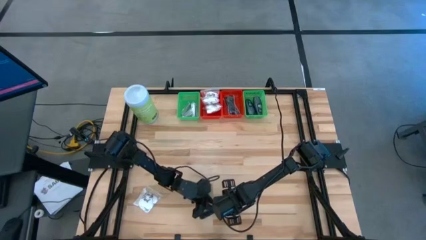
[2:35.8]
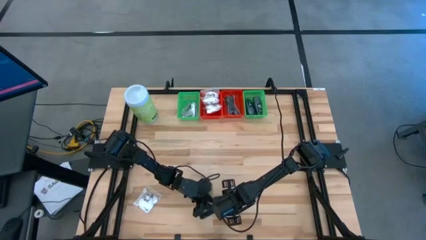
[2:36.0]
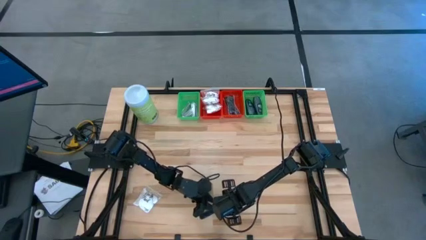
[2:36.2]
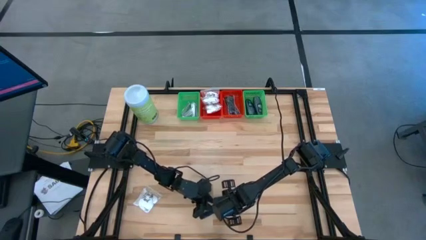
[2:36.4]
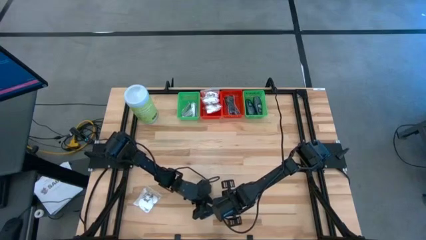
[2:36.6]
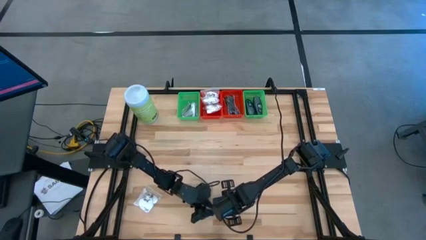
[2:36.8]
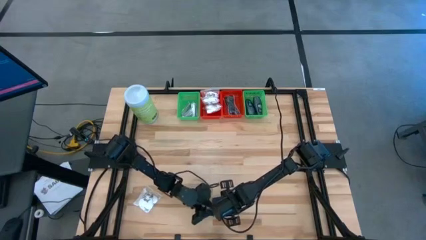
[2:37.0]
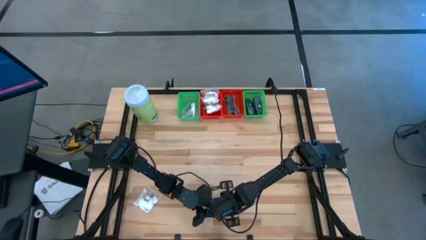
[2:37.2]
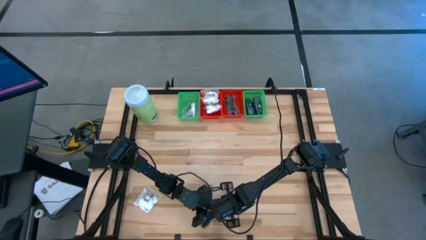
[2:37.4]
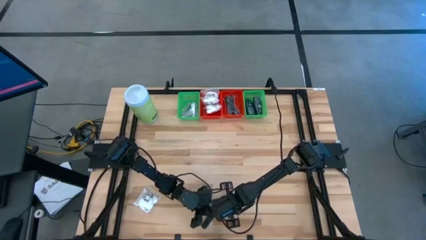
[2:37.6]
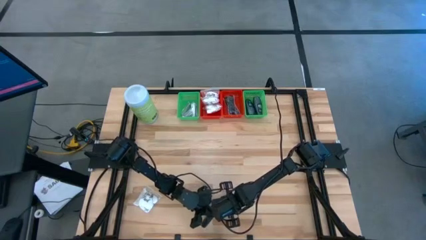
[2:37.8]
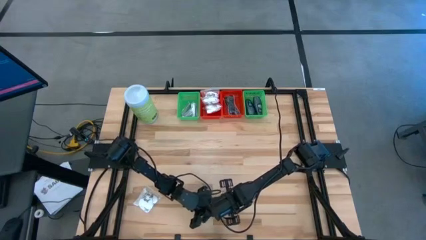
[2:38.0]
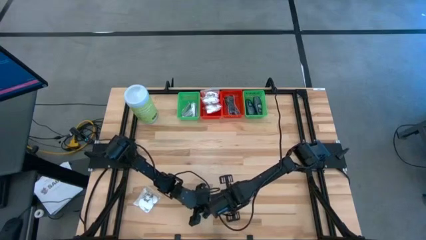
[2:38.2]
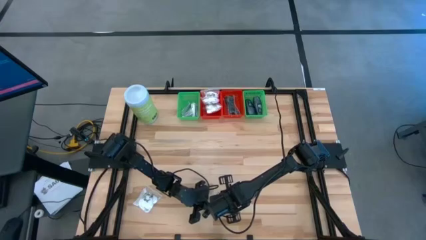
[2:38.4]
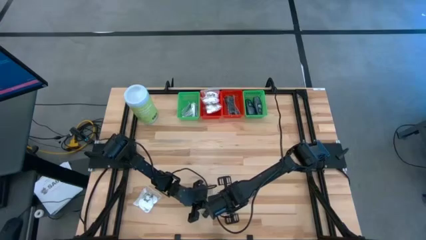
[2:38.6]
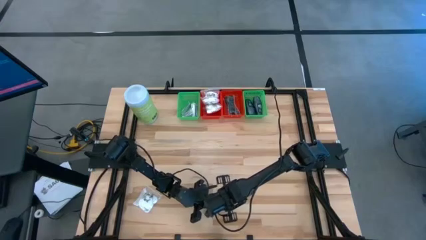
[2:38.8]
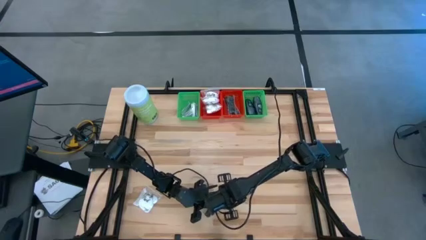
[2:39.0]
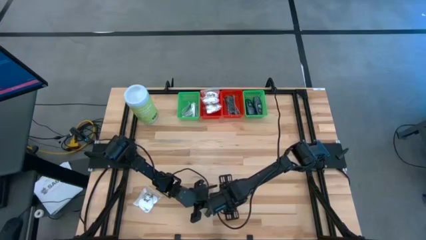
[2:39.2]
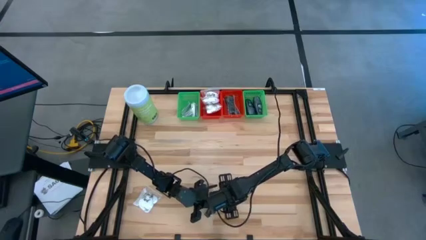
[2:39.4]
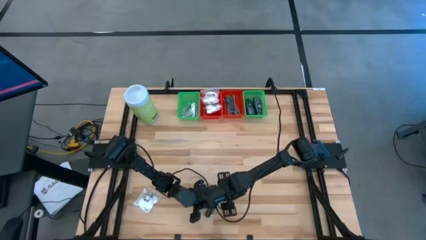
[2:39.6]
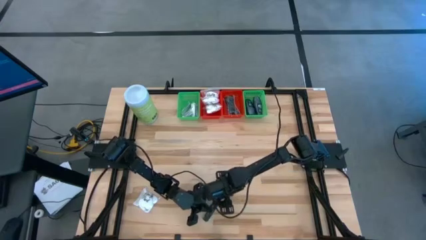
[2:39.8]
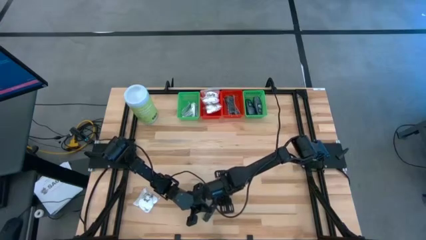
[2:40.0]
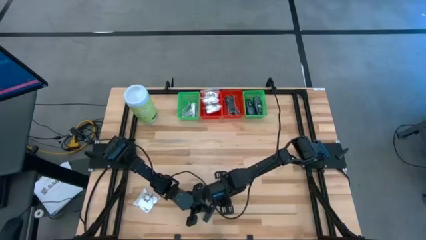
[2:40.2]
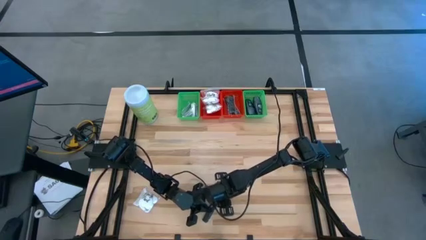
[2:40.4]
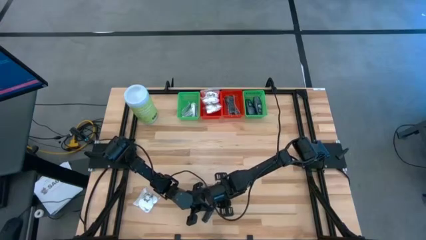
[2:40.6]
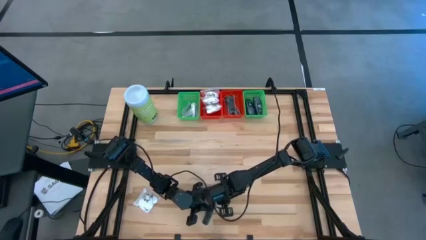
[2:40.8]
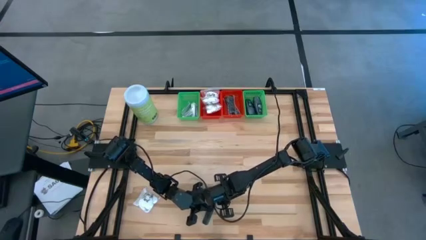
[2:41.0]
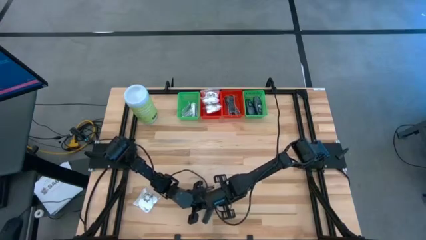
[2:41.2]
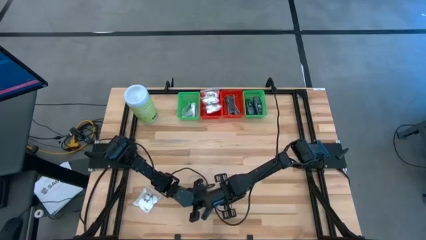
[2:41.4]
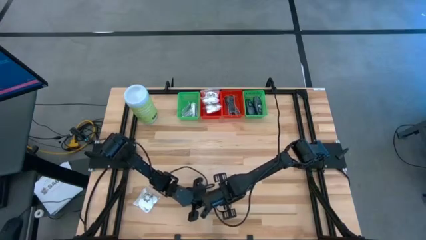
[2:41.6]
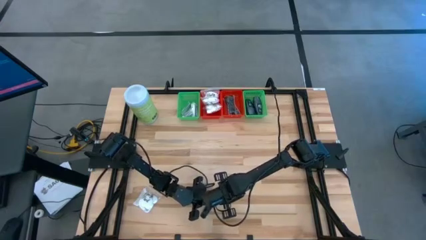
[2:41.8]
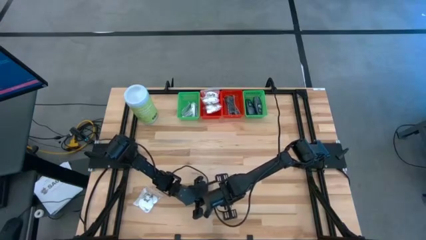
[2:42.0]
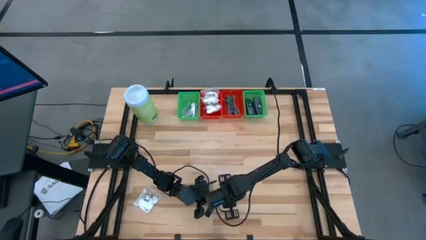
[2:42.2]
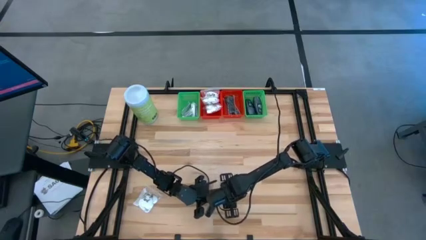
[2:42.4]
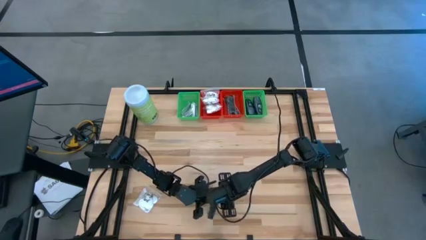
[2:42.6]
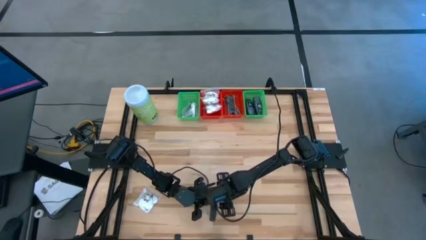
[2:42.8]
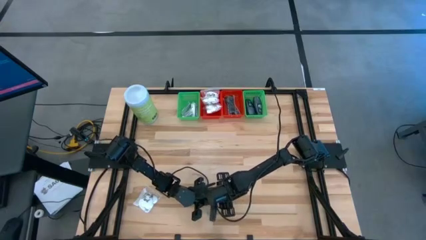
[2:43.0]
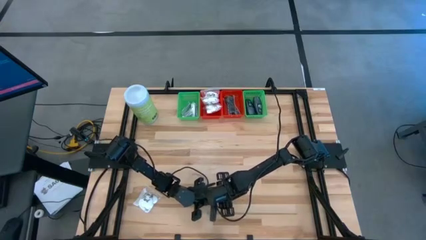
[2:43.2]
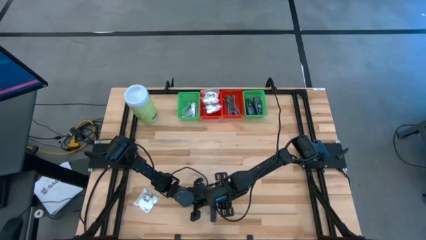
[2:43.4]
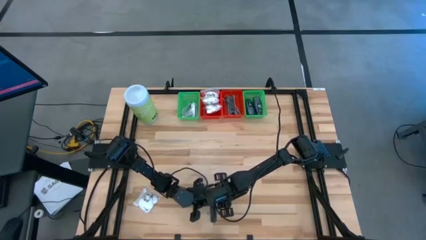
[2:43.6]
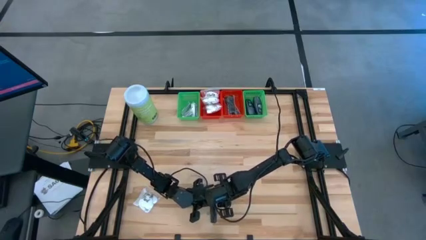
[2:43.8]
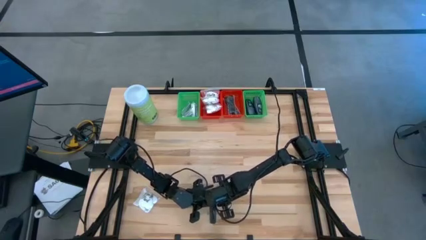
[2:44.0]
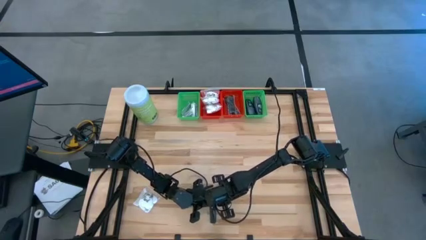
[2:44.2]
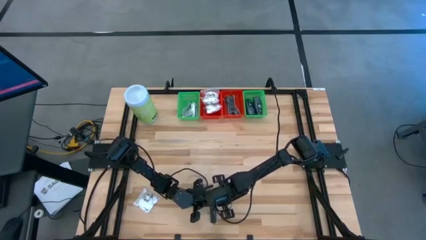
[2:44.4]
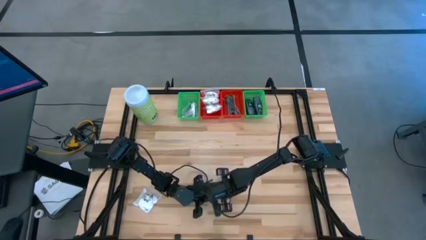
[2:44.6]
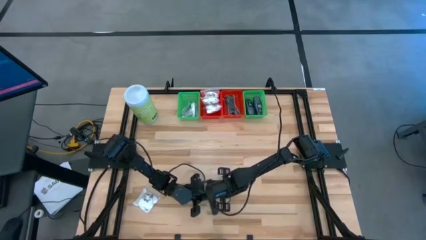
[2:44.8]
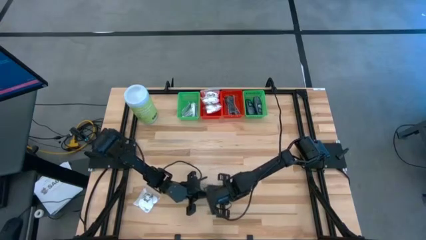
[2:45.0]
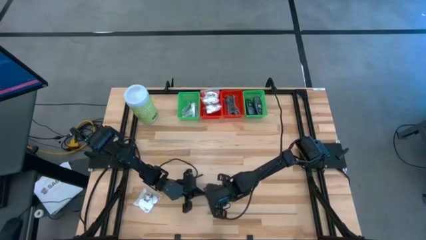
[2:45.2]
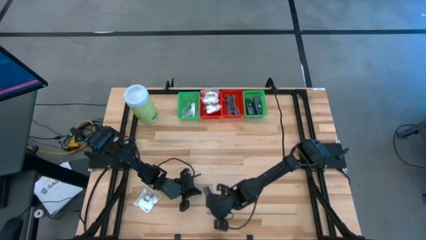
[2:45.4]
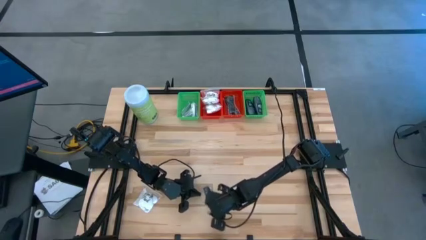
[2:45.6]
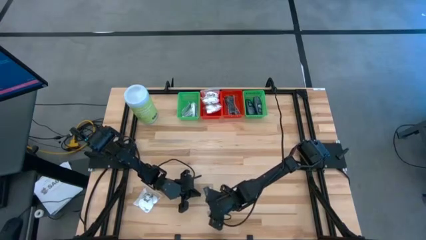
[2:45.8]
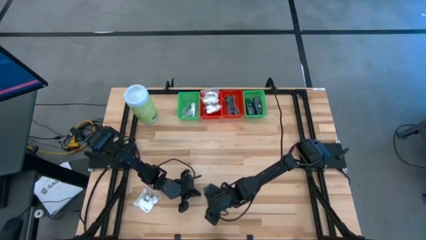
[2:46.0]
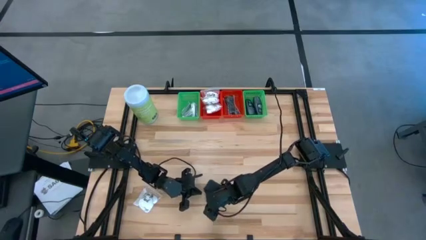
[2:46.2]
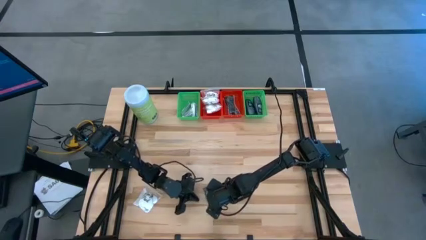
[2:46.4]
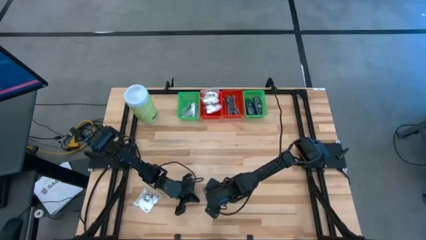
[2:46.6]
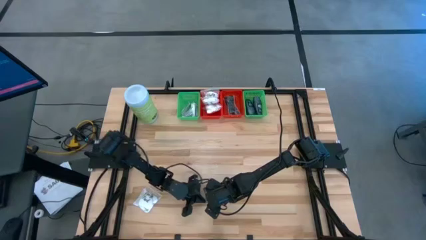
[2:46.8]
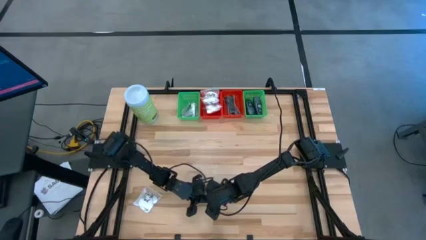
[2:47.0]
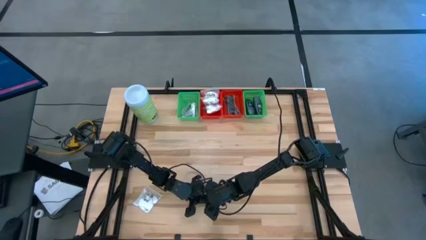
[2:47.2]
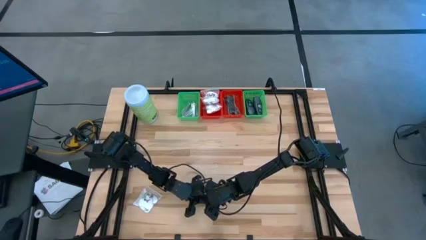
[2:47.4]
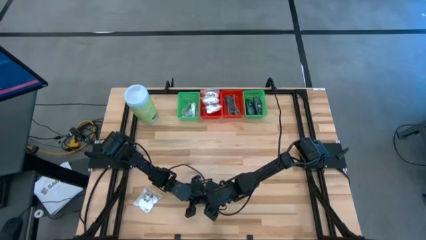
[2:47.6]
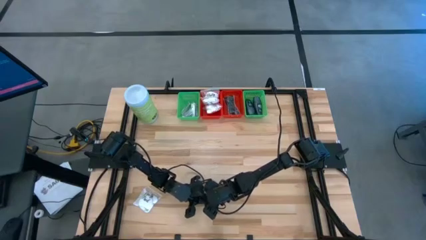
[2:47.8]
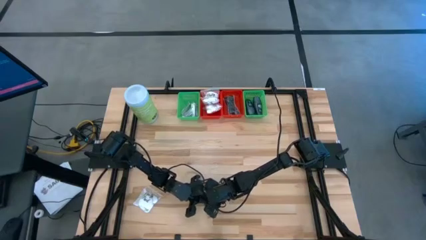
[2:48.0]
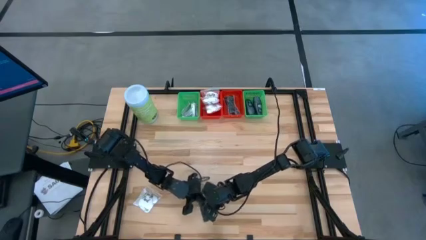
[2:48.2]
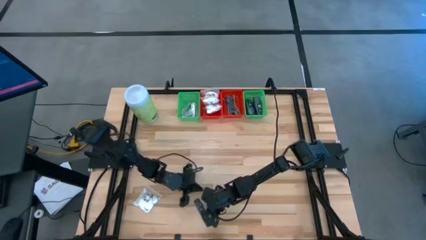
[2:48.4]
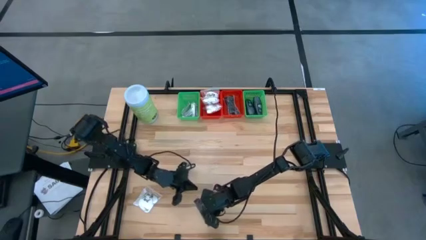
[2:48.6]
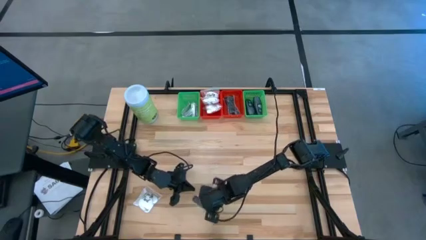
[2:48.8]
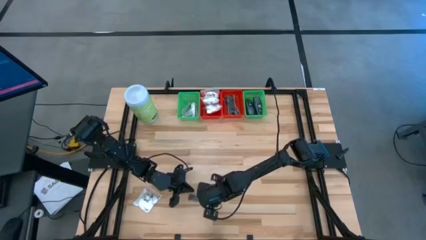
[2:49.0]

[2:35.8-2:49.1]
Task: Pick & Place Travel size toiletries
Put the black comb into the right red bin
